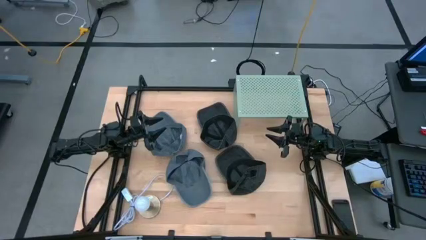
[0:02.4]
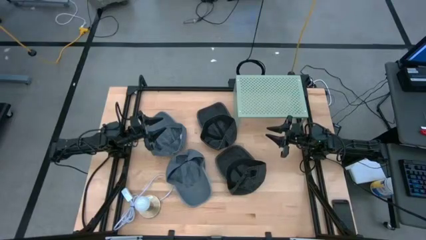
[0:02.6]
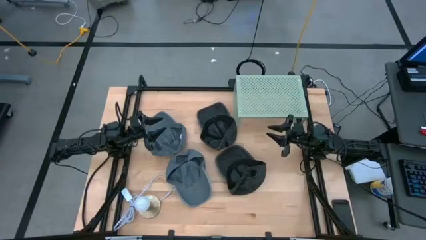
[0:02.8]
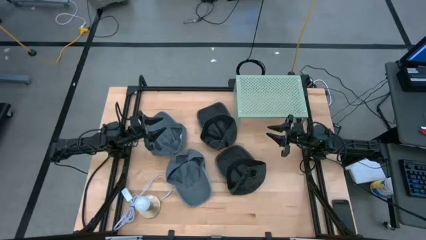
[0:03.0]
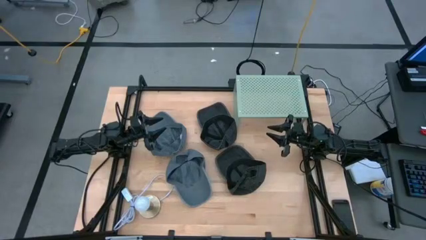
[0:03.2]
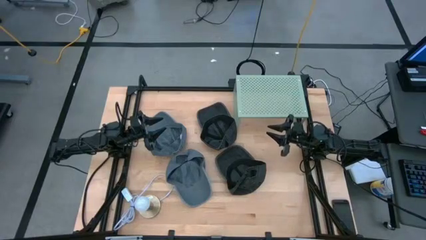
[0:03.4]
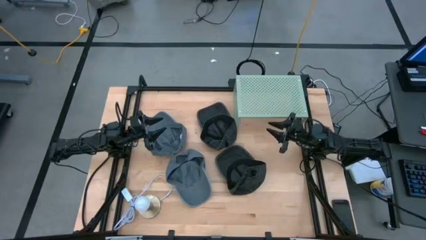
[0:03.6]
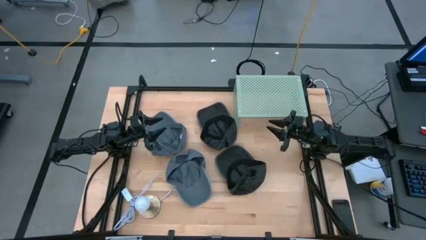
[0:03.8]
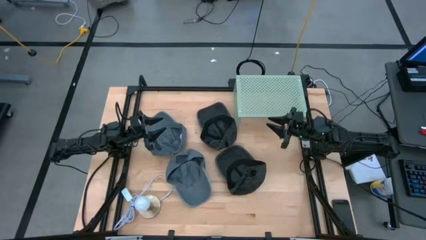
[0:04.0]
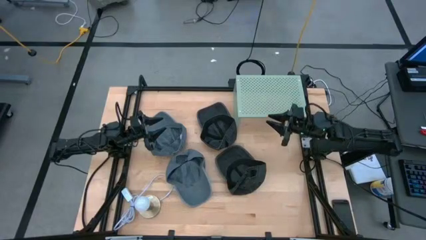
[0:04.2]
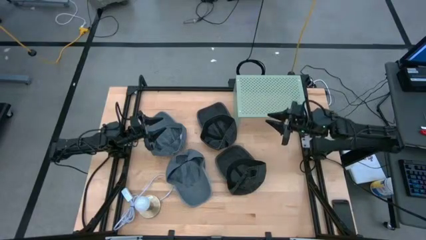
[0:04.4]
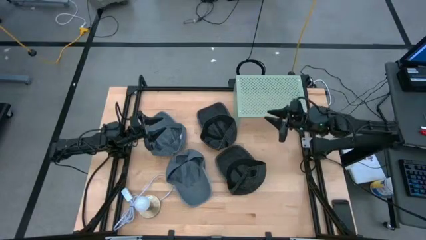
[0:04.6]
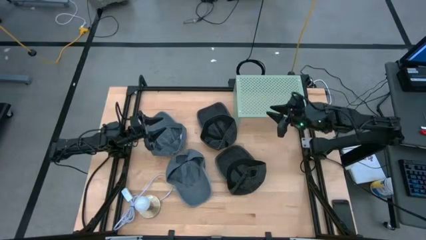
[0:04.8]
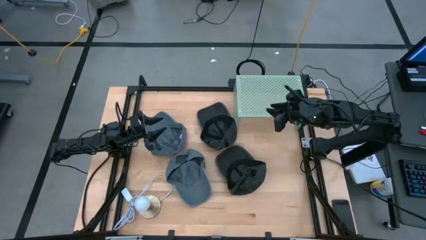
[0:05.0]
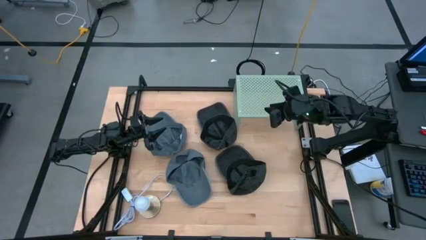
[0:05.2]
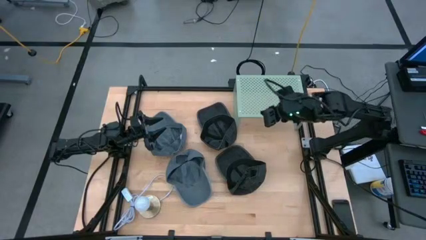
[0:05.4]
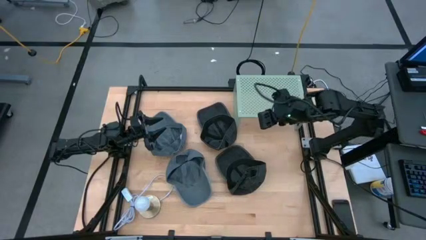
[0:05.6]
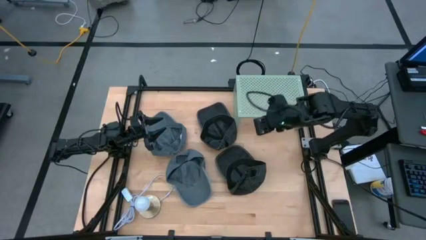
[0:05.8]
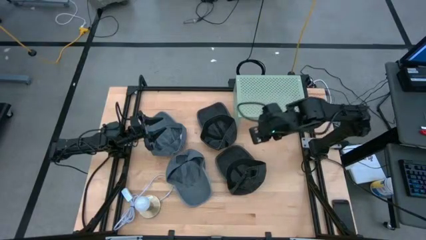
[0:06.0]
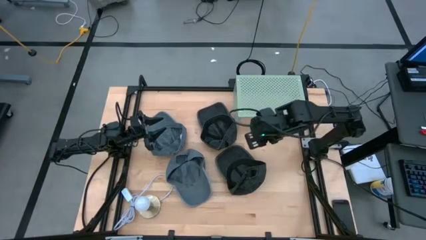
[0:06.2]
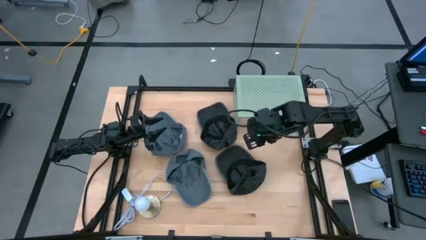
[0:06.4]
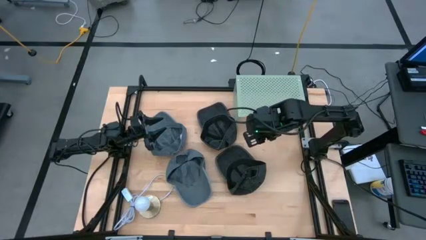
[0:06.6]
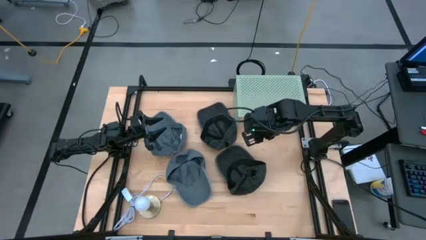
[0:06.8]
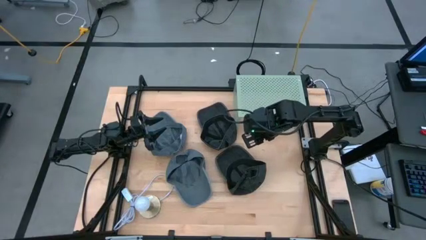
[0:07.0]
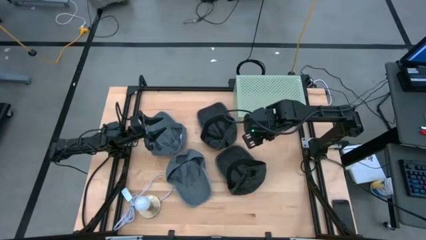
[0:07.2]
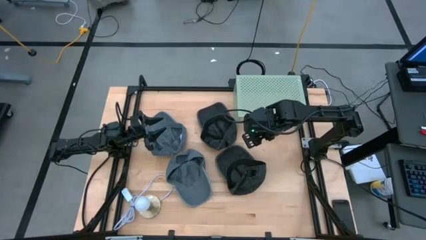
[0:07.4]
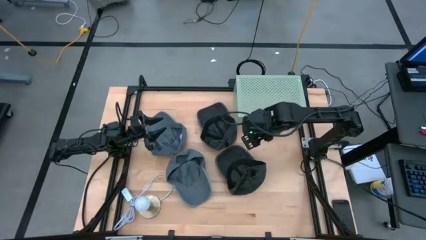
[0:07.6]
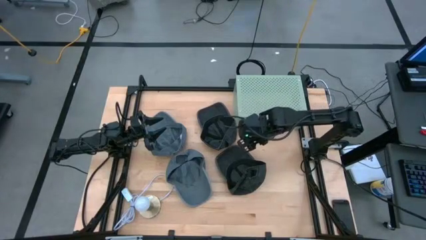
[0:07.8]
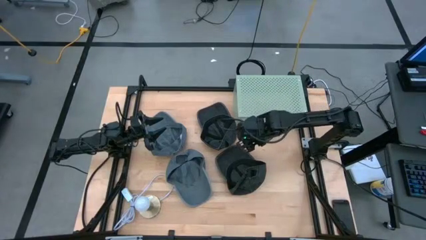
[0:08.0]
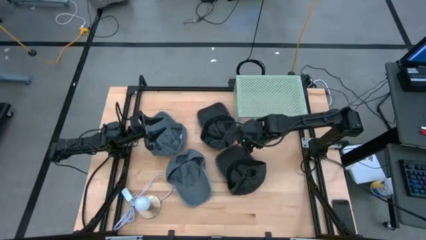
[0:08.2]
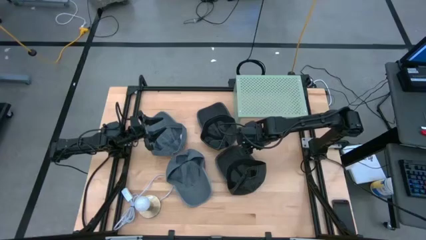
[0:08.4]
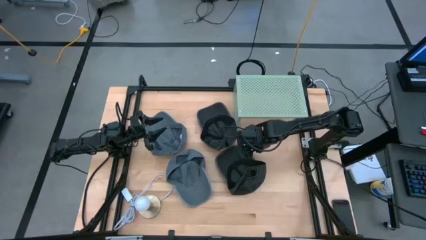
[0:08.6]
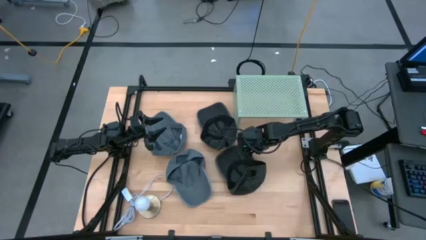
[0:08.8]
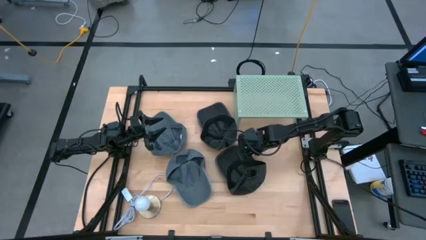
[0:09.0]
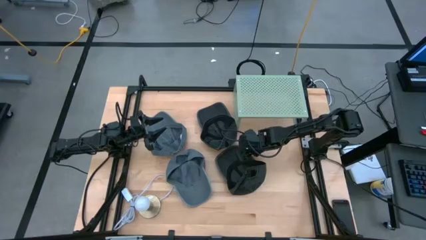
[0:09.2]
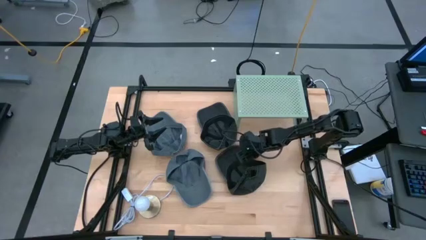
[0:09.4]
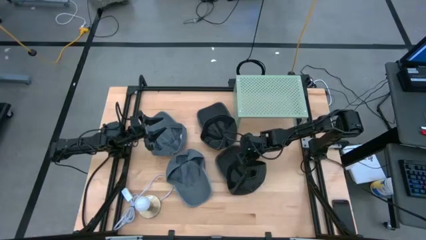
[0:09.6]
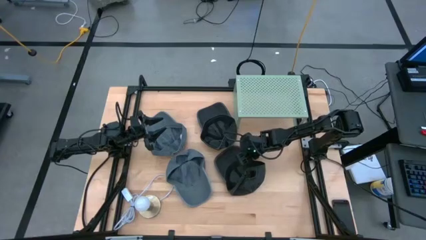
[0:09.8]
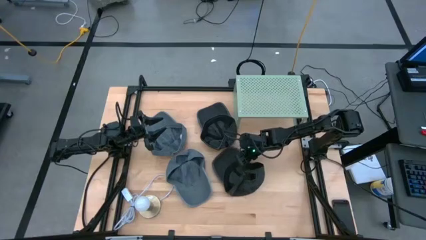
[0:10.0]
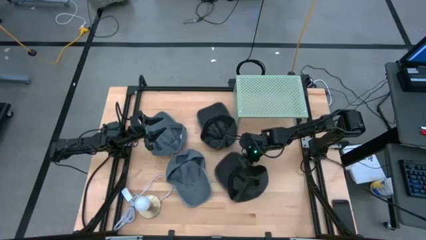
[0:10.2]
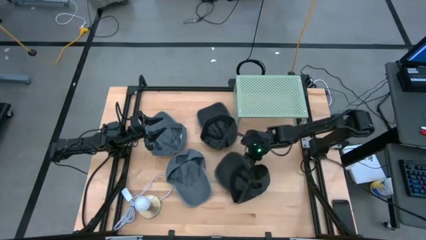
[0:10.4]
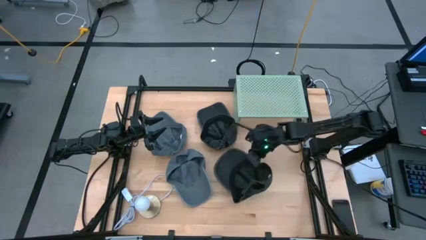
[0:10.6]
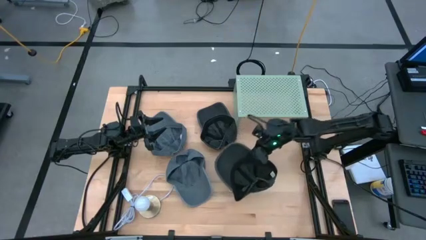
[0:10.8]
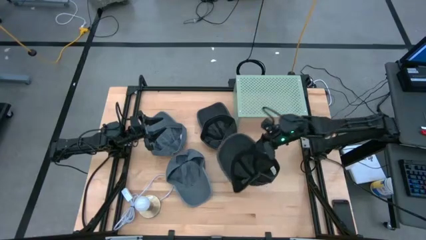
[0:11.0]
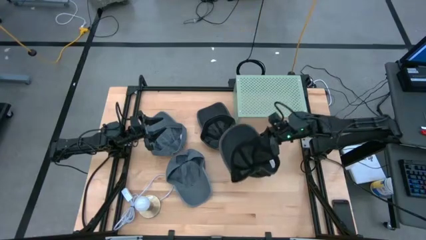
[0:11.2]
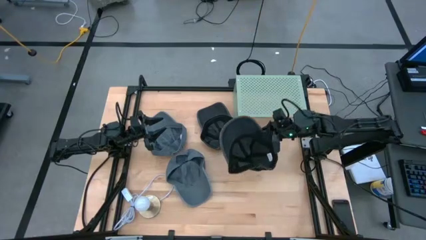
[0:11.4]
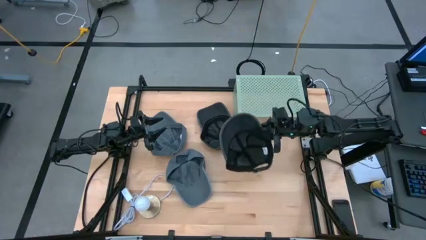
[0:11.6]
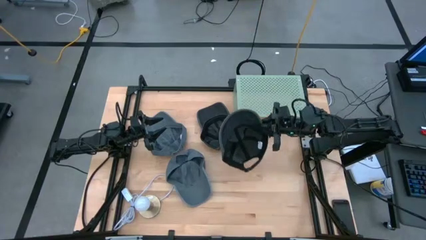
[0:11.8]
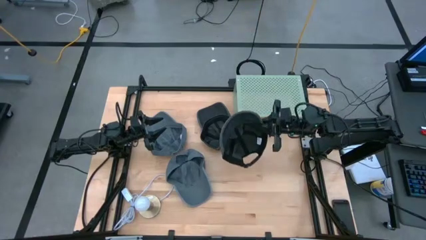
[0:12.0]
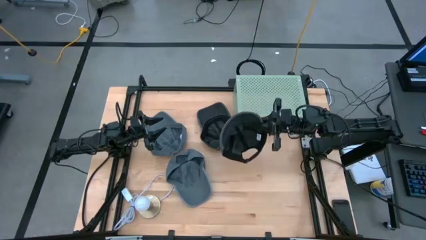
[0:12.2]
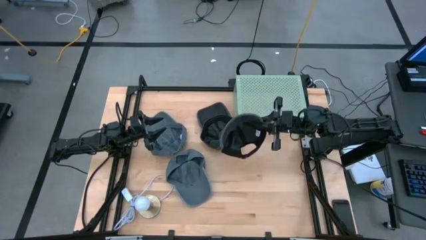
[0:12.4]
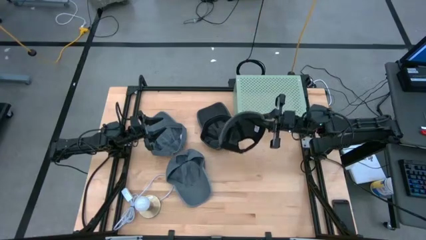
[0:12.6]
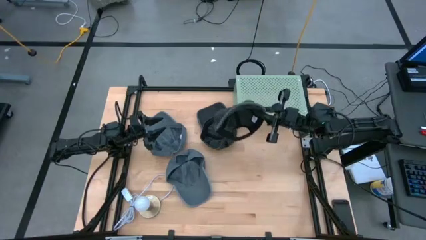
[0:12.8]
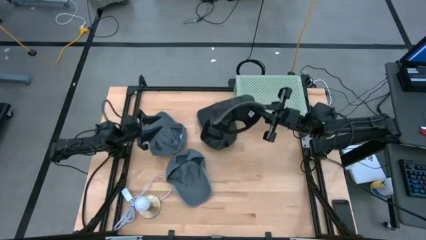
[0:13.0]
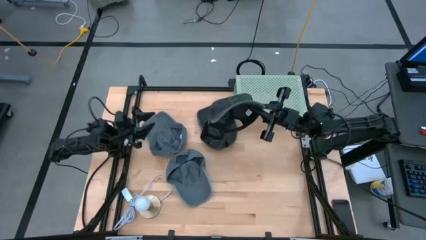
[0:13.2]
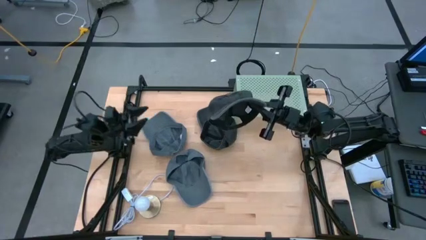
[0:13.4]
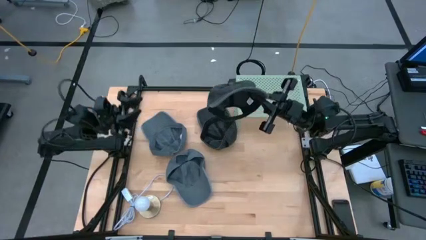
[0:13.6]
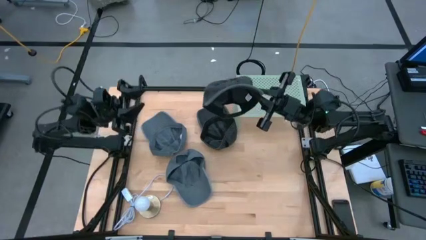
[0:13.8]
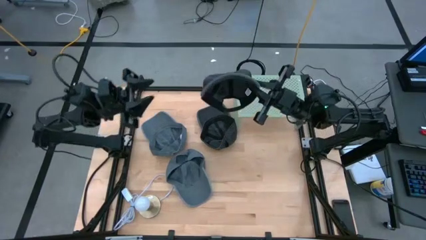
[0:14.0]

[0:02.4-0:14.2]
Task: Pick & Place hat
Put the bottom black cap on the shelf
